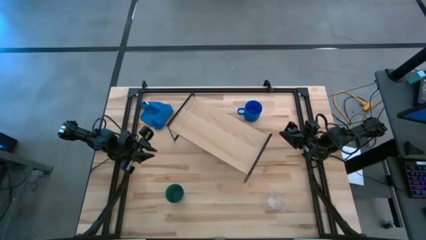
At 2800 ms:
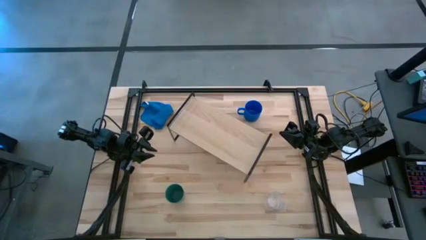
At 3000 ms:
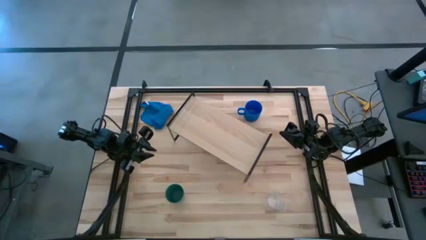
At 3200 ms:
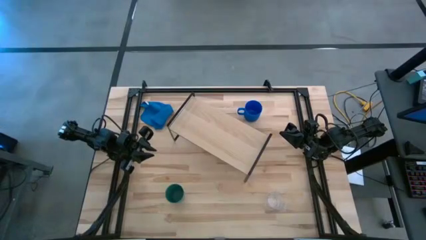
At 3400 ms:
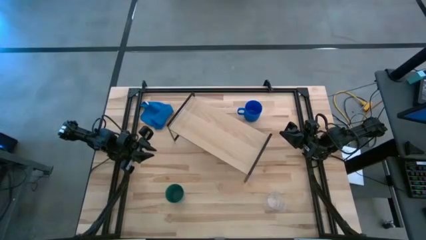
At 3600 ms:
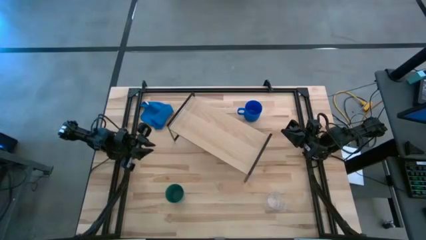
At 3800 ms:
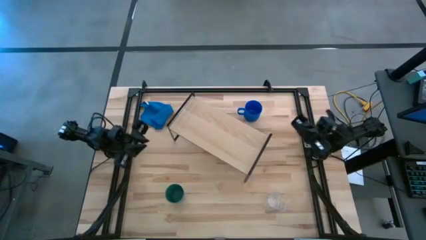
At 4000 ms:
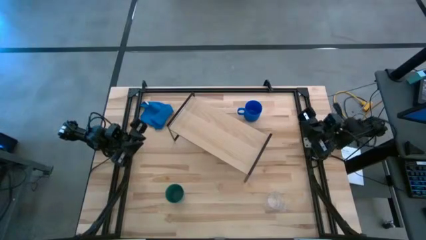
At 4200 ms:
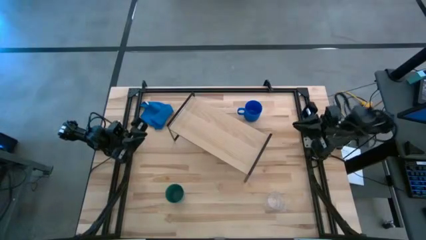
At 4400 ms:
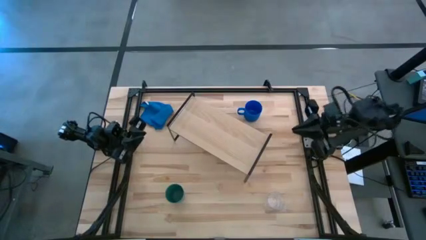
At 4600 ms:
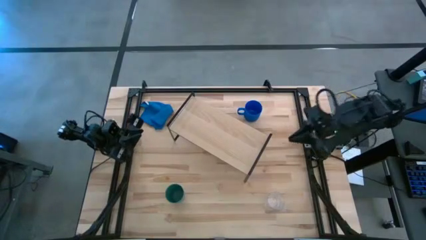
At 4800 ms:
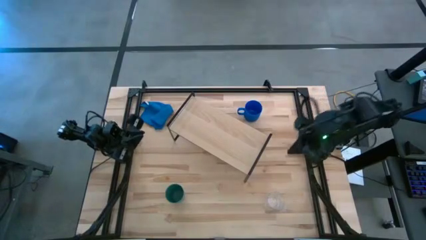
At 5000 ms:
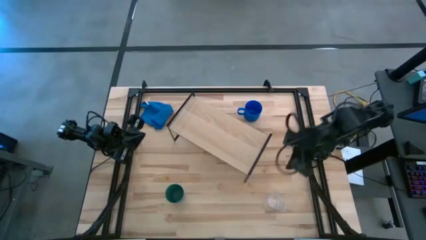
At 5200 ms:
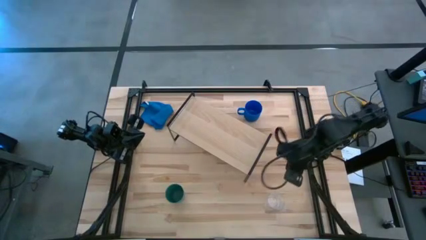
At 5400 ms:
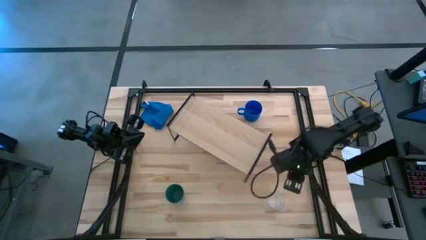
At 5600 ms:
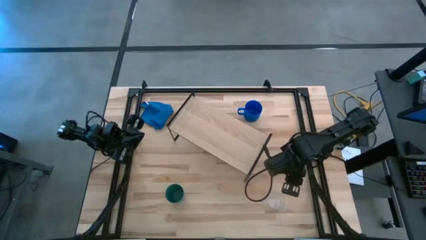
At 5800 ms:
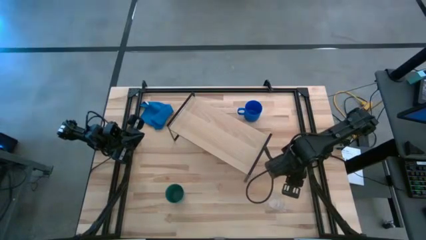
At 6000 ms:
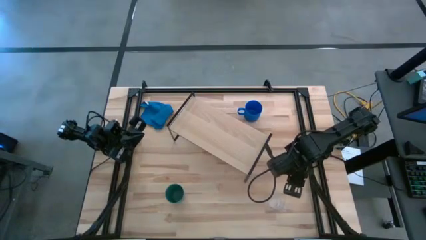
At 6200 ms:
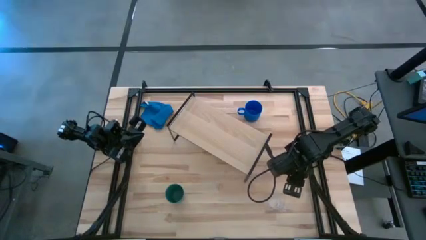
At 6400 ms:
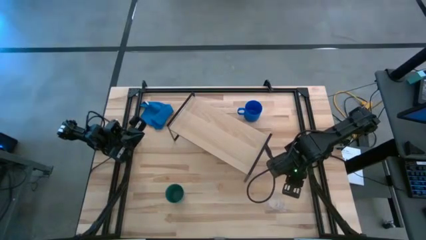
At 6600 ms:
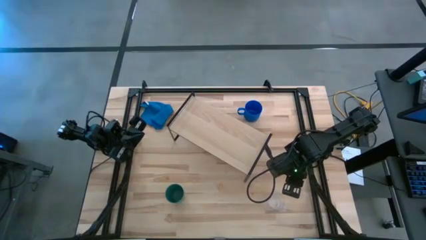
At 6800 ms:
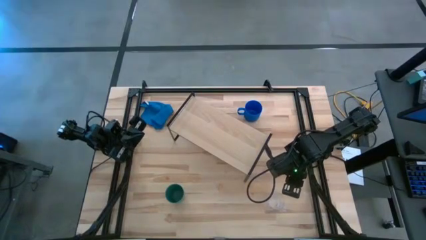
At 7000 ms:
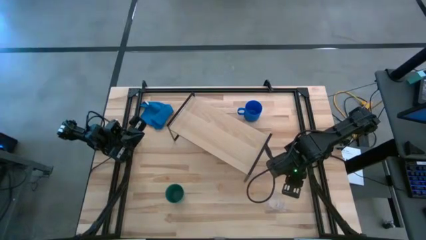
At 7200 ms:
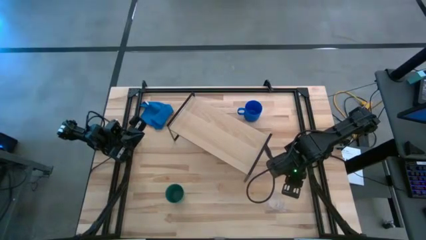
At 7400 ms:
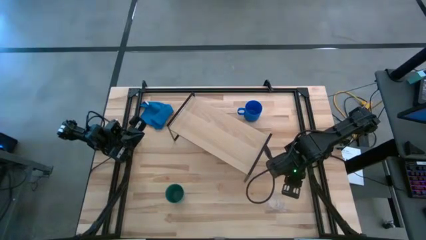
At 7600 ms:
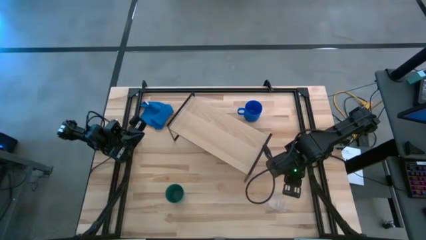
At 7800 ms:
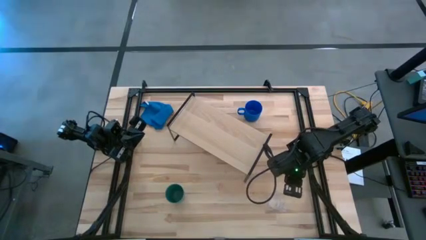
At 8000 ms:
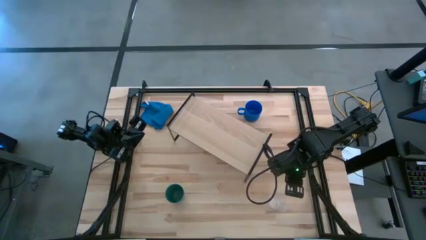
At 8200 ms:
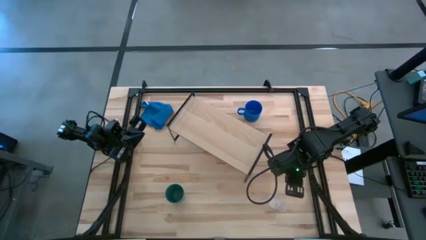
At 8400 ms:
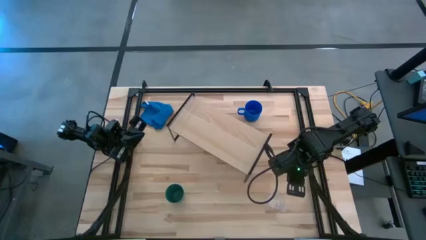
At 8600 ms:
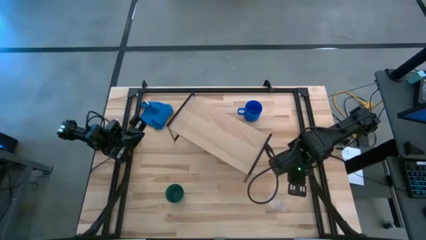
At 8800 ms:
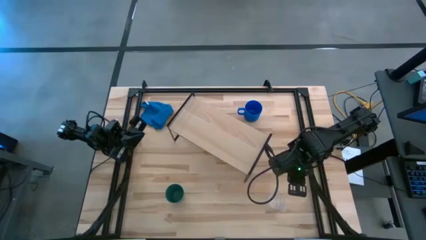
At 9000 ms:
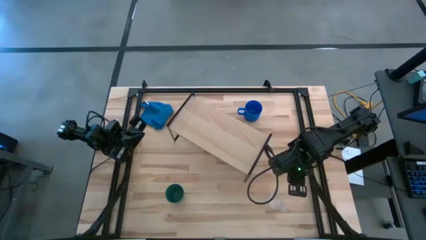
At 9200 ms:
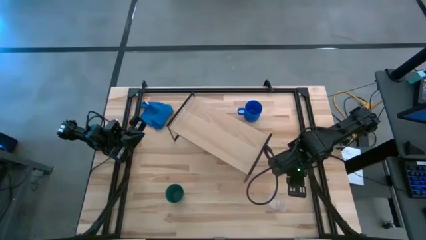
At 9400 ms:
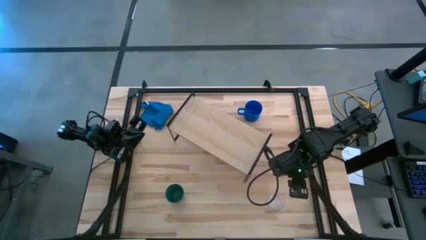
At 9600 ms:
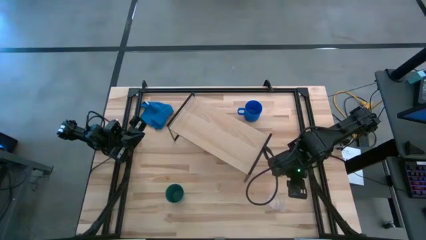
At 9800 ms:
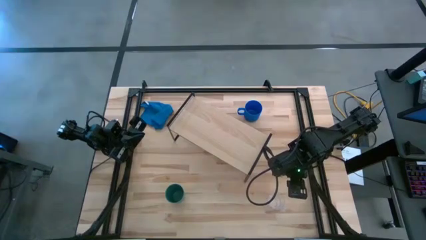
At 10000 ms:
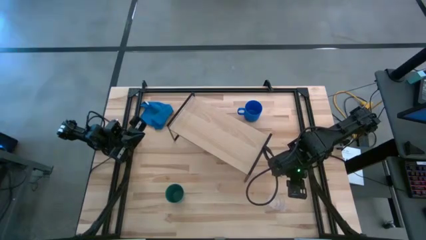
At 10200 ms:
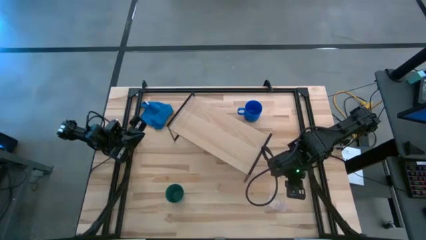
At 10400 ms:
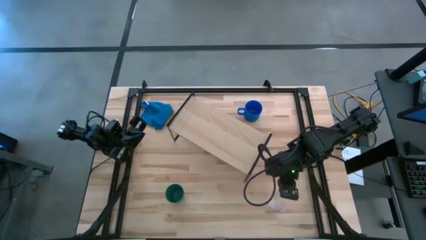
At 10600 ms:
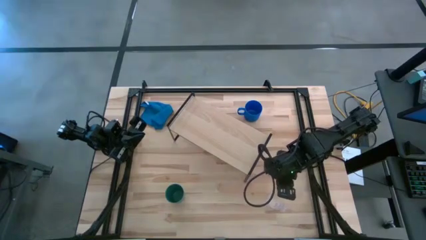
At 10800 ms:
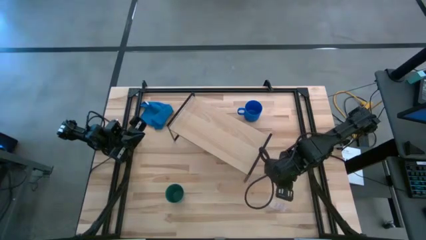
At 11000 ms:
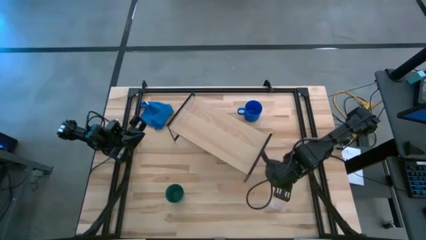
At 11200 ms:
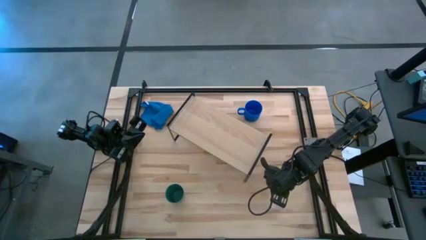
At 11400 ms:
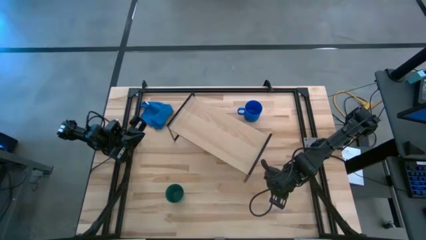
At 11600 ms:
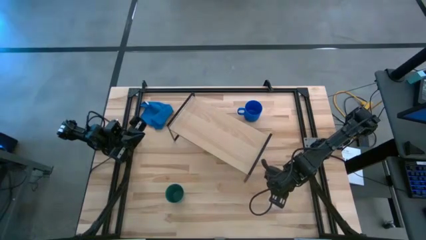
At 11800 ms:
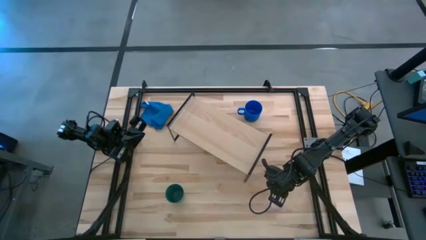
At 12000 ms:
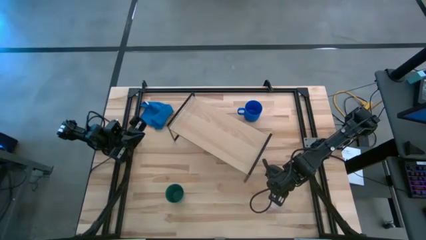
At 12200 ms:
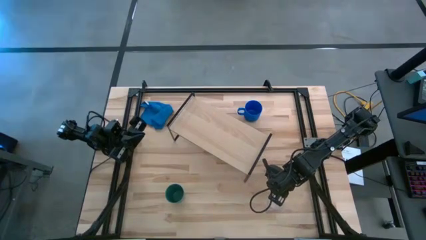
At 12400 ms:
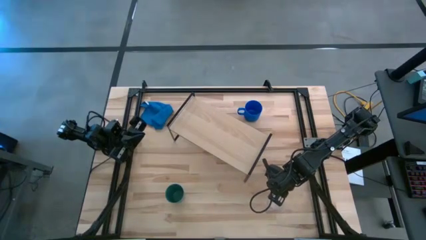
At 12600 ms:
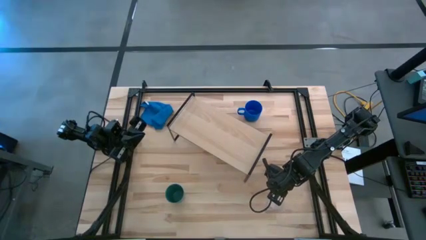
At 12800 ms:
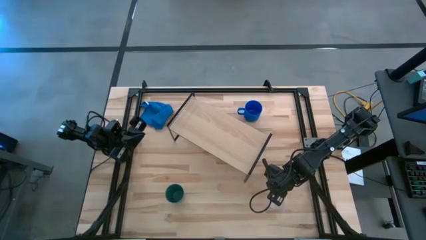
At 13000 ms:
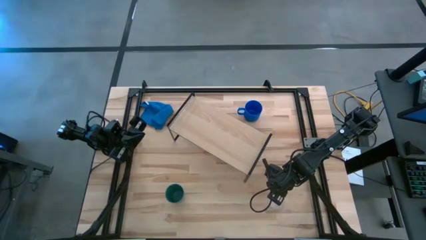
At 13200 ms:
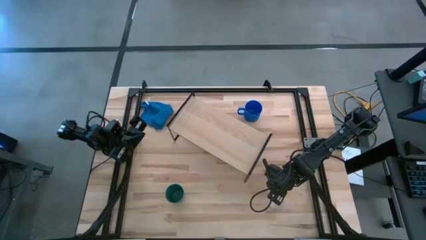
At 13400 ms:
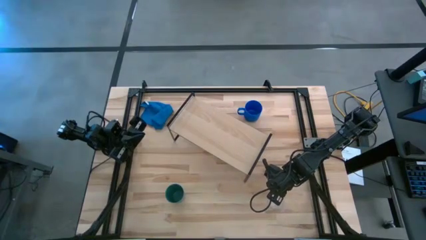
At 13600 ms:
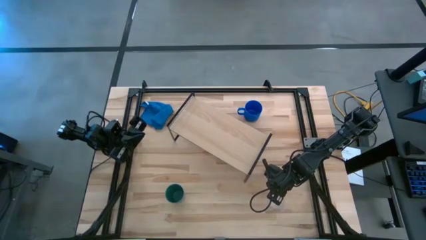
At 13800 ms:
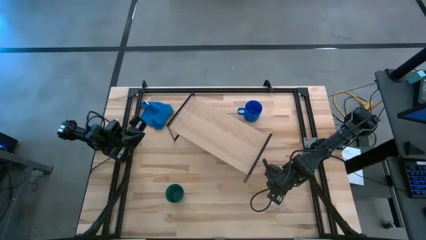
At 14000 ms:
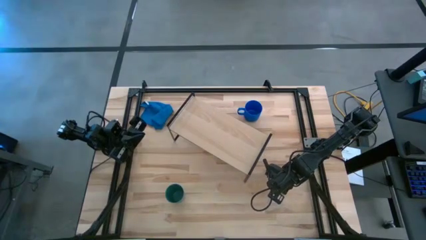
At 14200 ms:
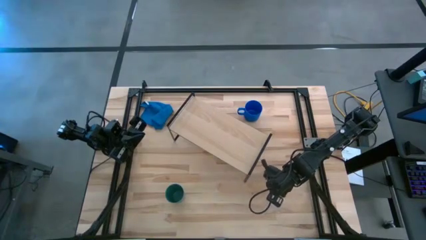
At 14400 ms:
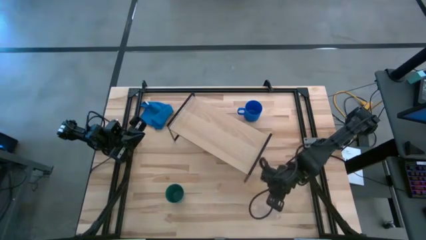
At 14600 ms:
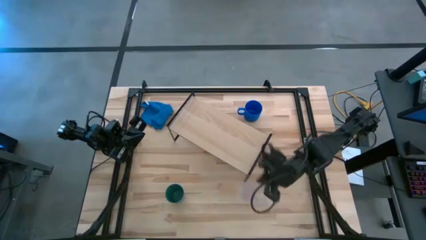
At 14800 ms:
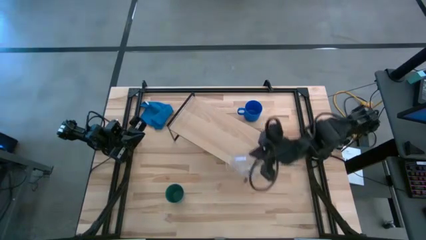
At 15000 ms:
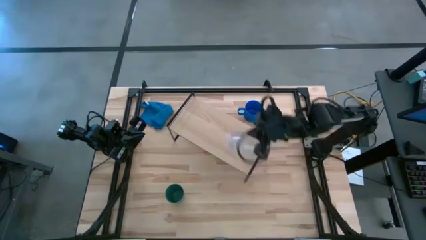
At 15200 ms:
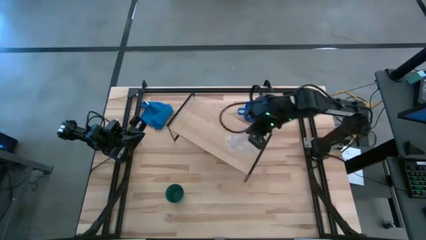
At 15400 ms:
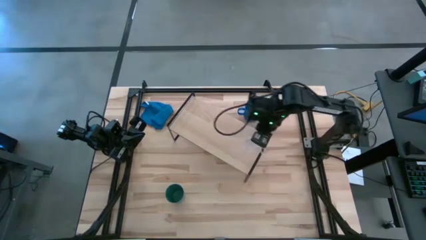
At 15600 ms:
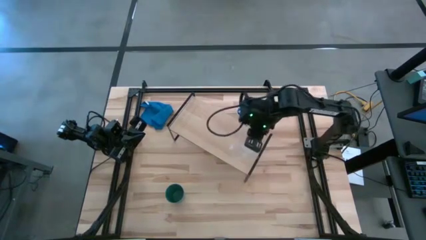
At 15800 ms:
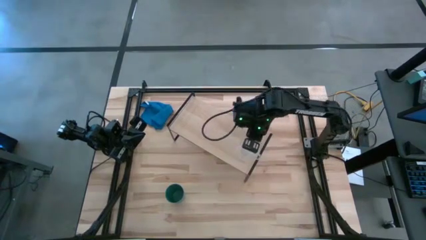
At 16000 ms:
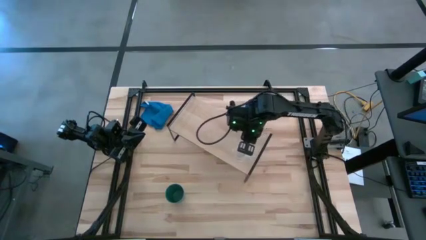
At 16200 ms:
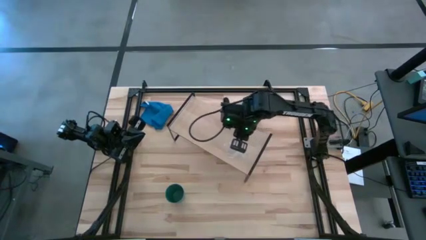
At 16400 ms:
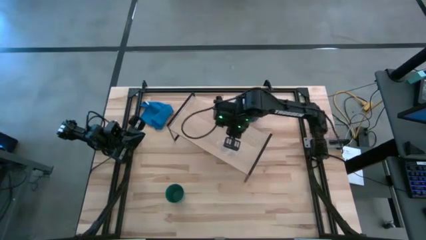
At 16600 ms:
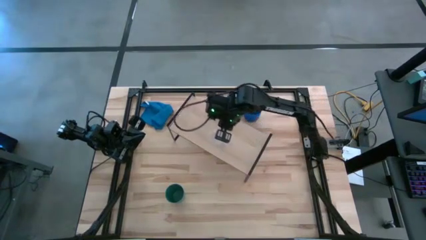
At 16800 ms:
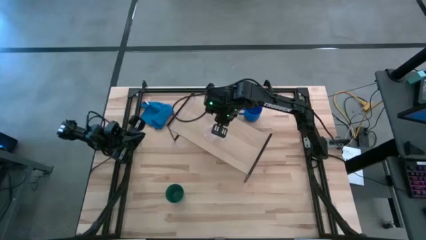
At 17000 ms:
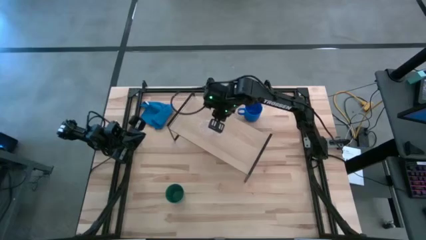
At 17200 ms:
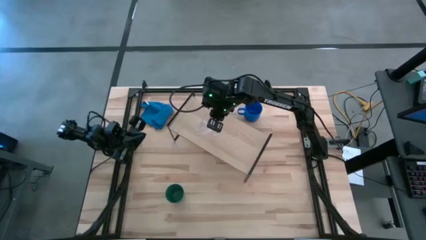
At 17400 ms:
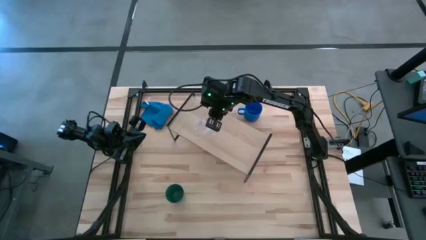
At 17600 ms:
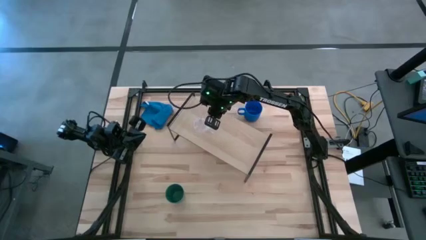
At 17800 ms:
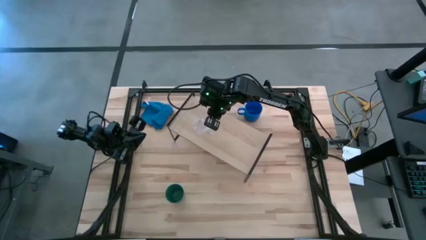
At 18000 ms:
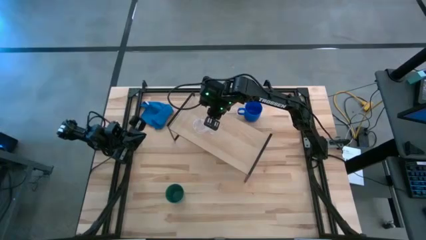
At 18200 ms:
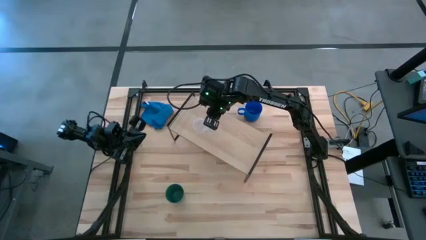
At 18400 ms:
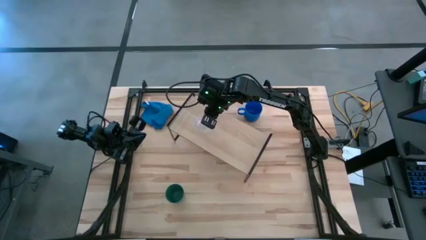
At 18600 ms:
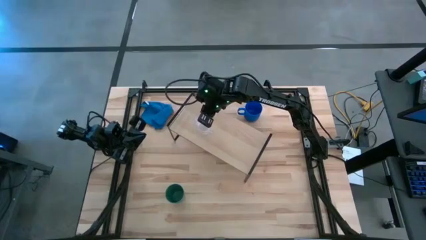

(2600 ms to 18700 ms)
Task: Stack small to large cups/mugs on shelf
Put the transparent mug on the shelf

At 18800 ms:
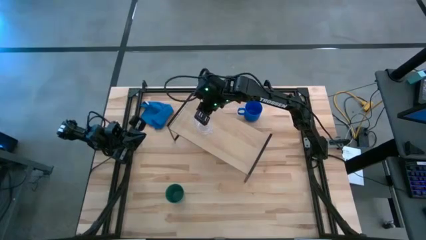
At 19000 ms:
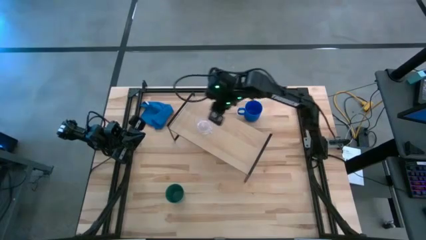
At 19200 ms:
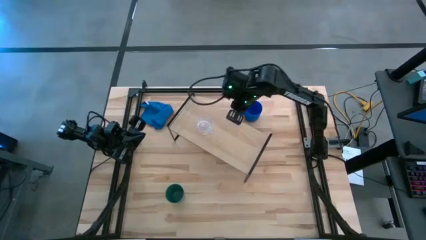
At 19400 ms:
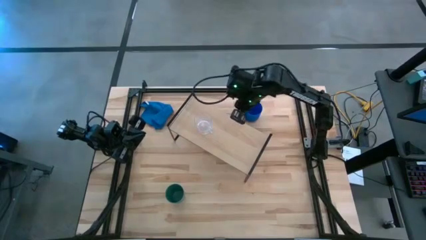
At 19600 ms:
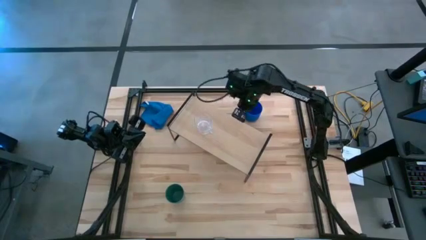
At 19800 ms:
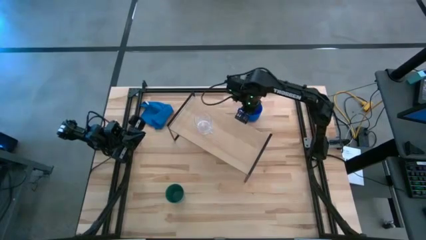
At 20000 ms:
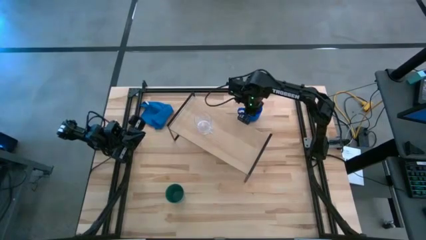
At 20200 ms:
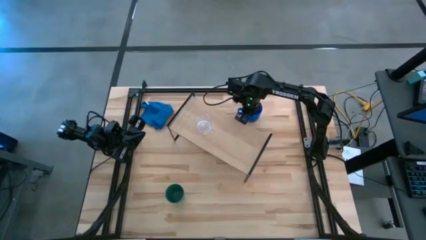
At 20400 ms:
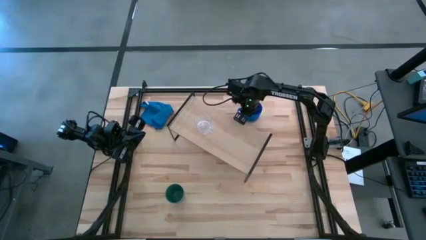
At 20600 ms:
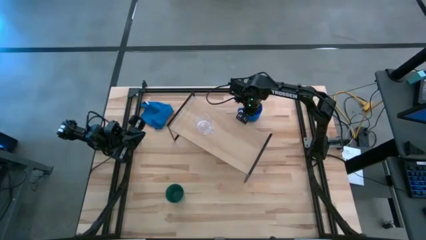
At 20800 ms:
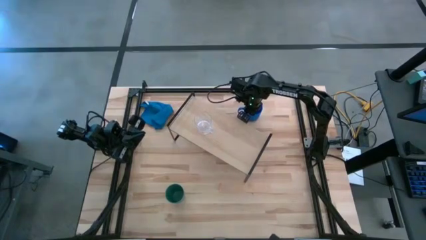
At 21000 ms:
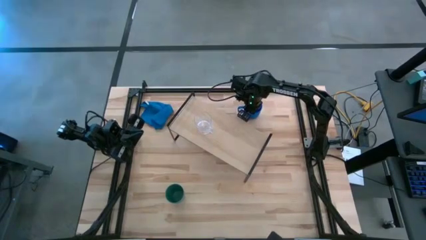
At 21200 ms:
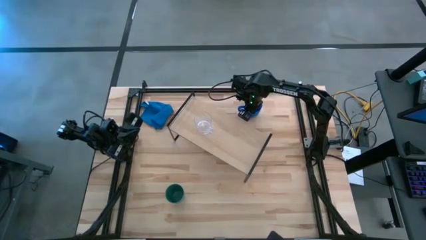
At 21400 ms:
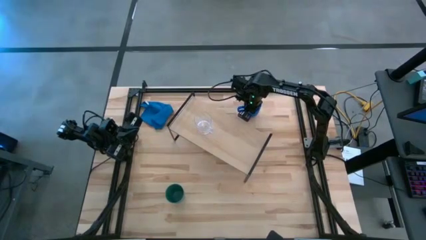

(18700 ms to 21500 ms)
Put the blue mug on the shelf
